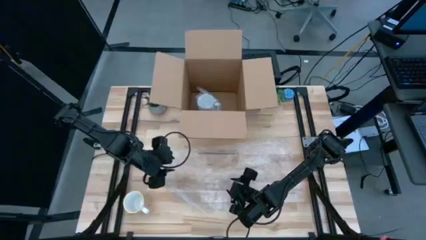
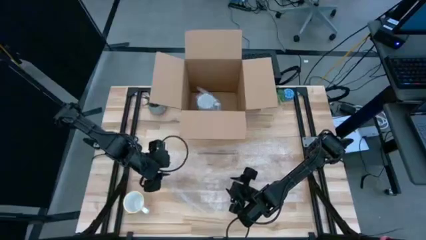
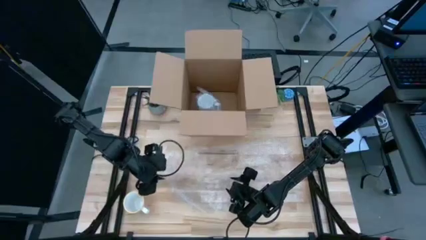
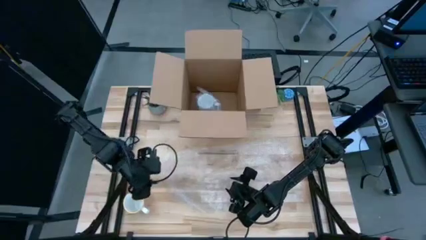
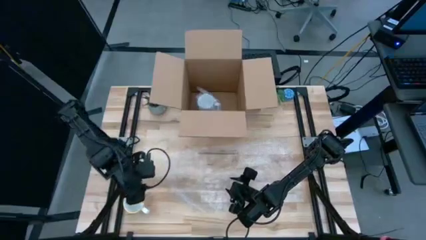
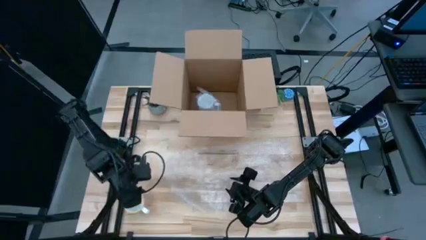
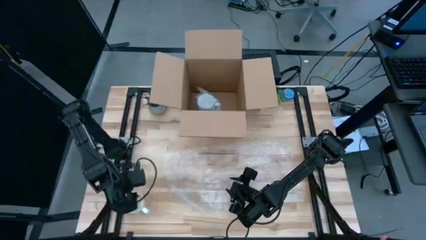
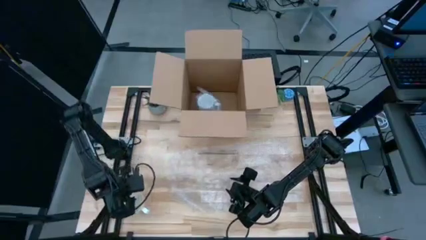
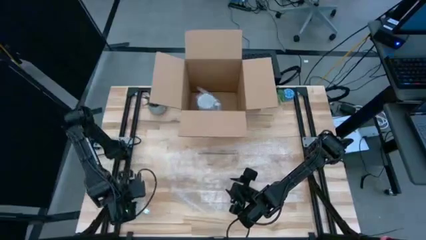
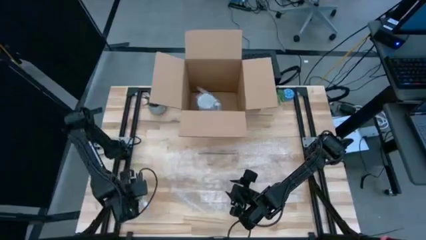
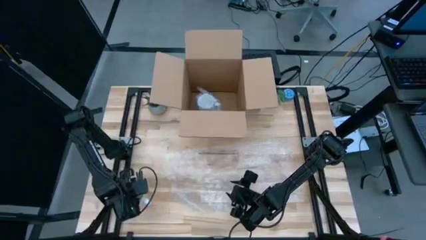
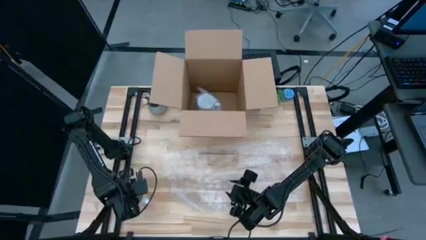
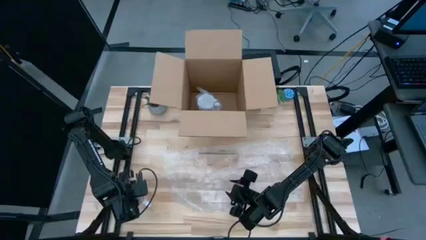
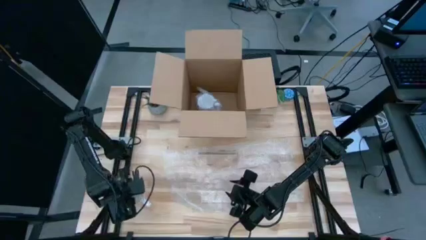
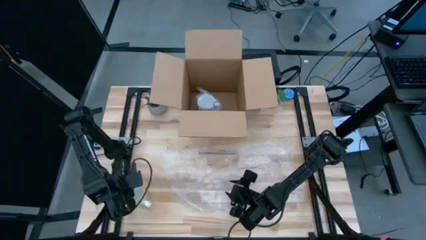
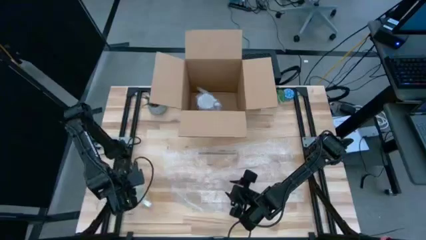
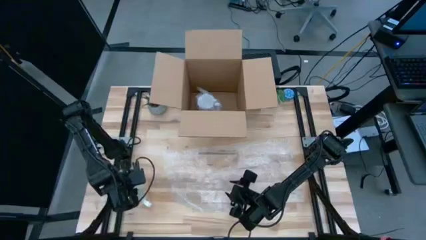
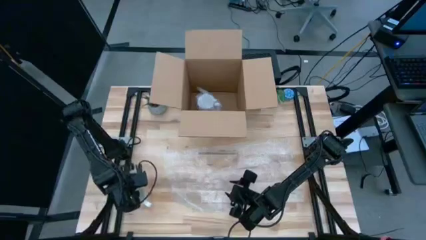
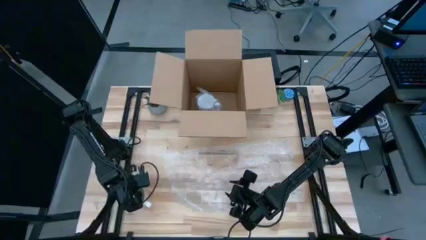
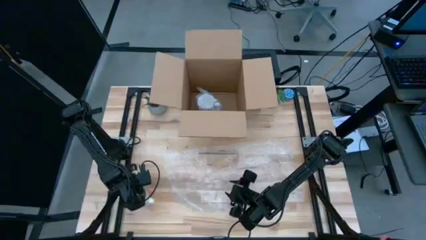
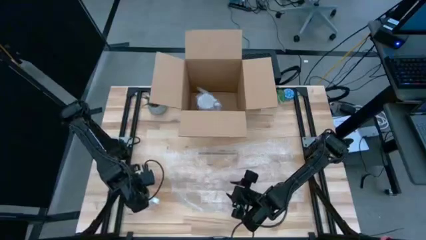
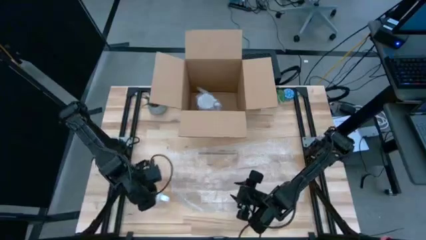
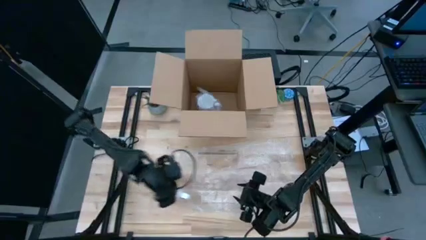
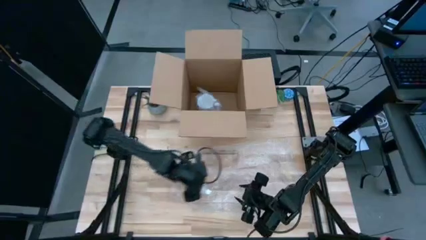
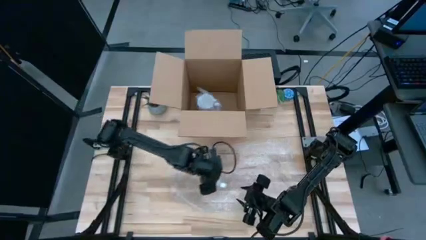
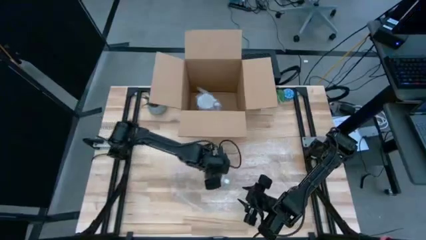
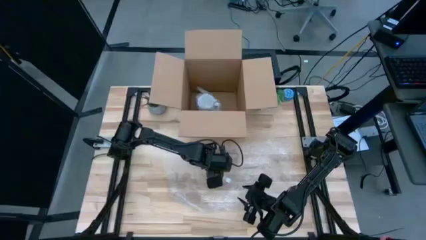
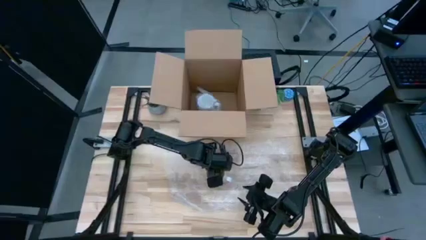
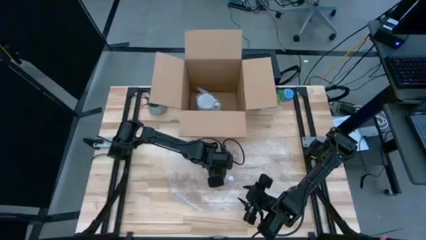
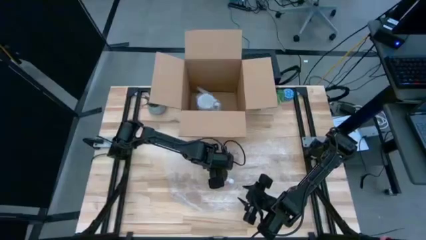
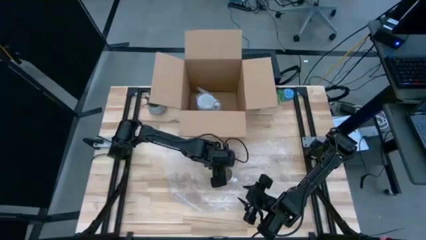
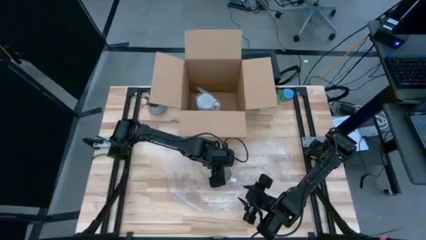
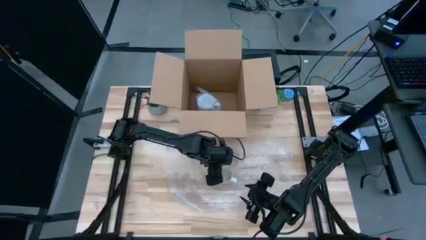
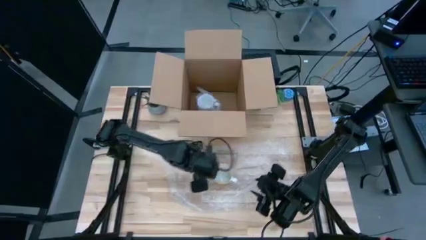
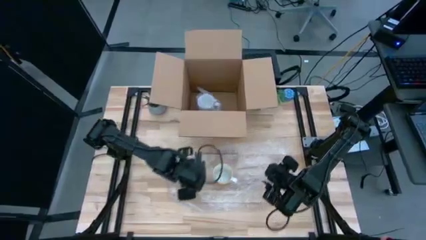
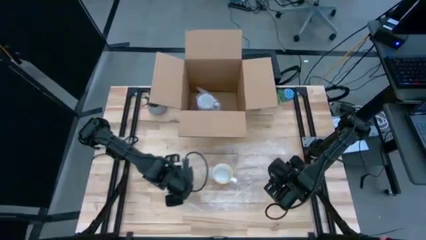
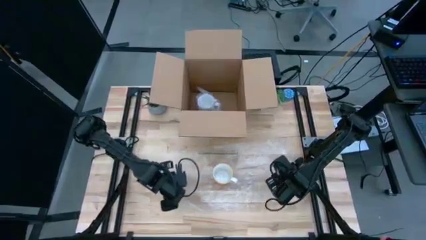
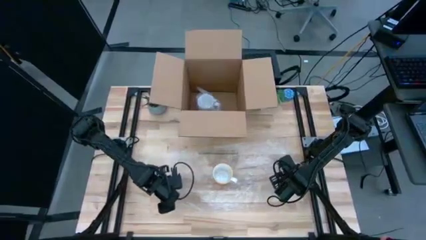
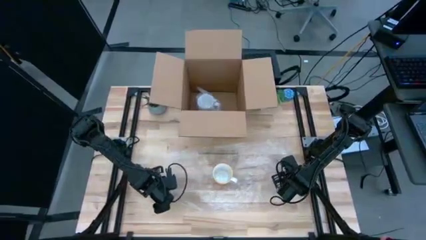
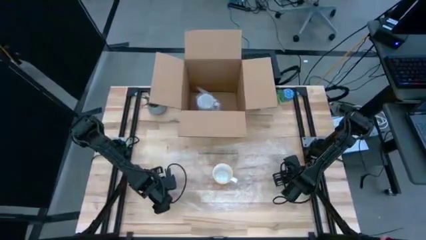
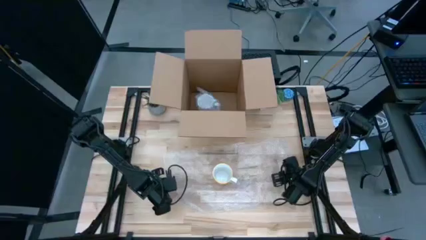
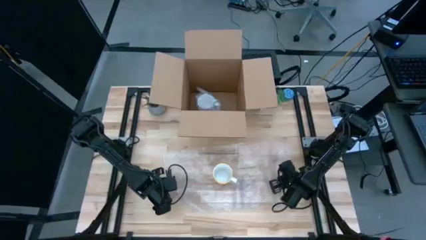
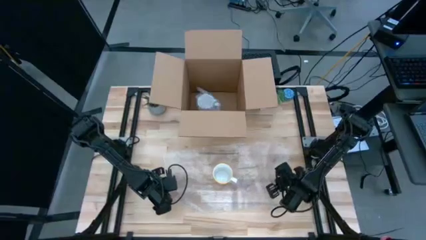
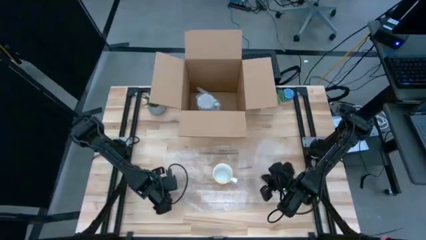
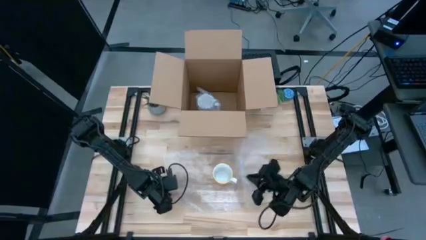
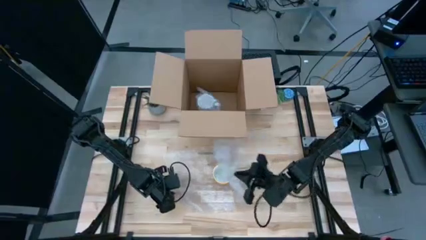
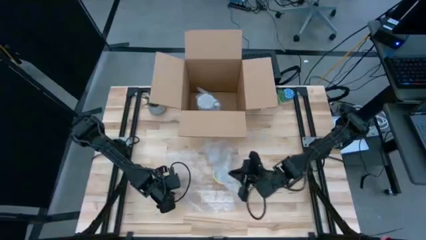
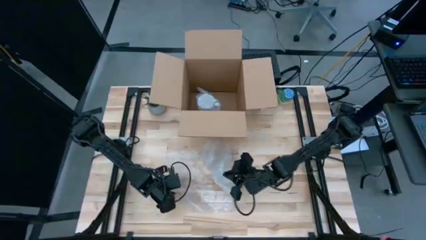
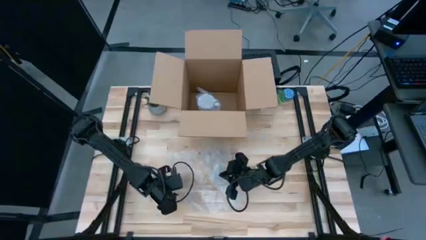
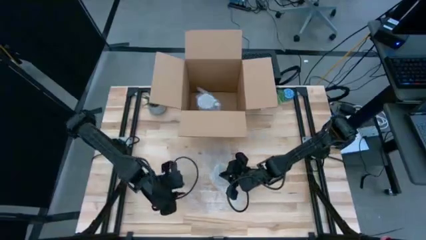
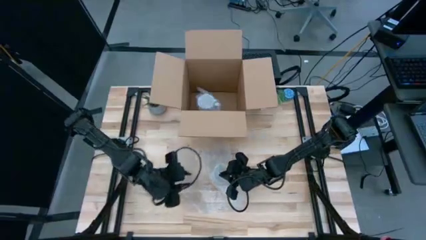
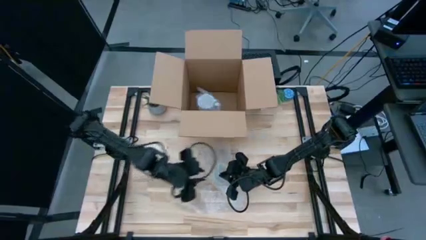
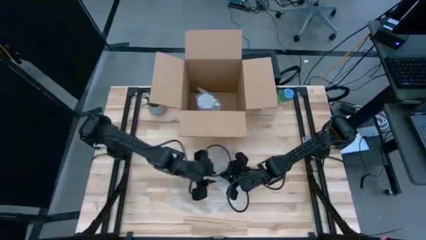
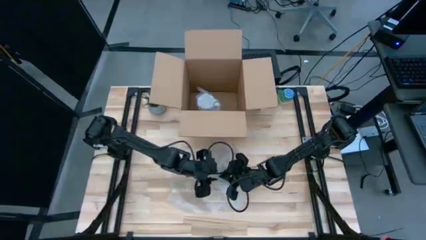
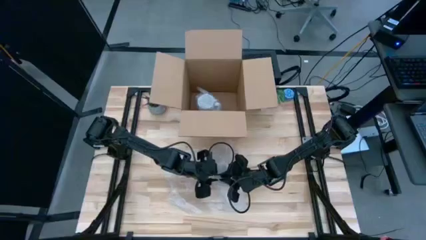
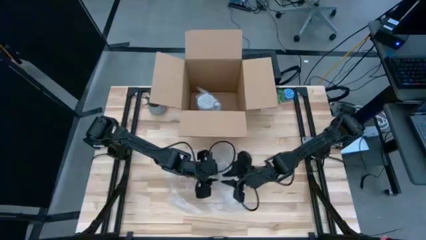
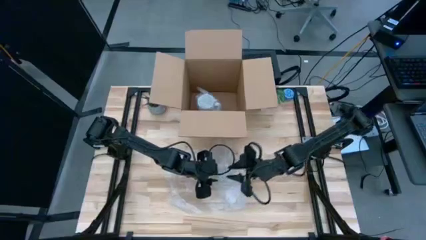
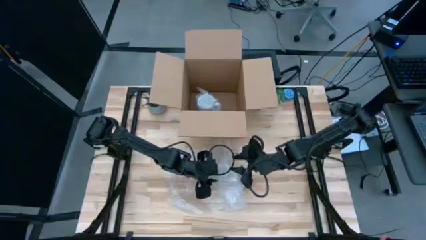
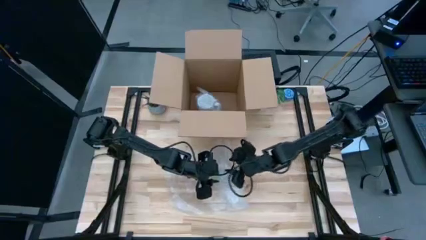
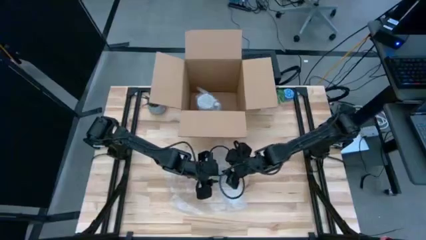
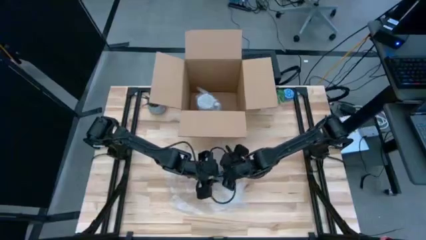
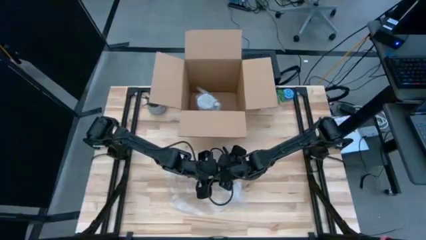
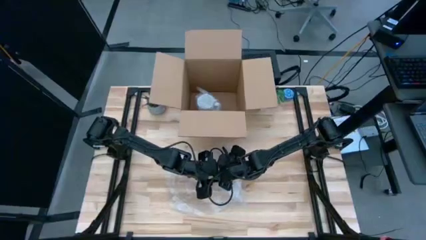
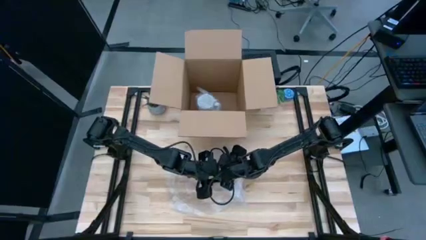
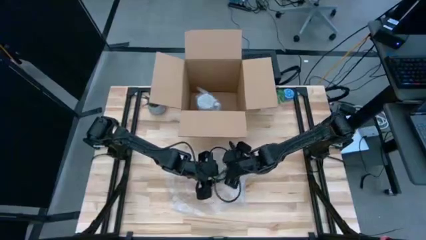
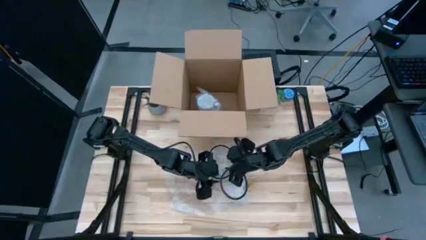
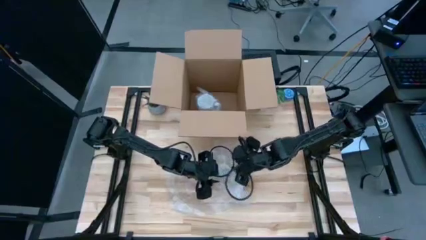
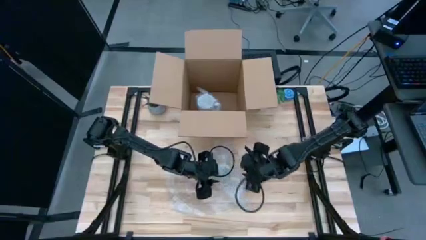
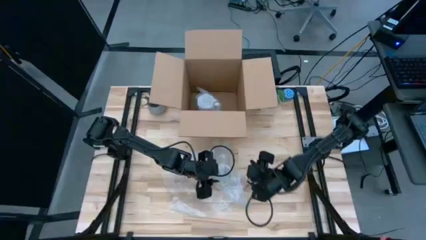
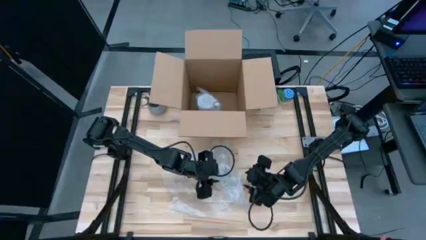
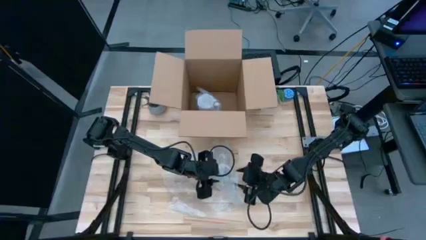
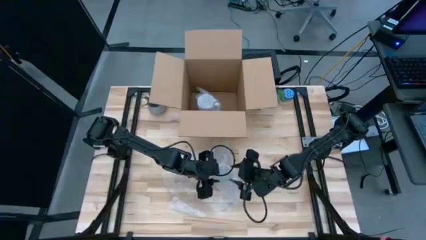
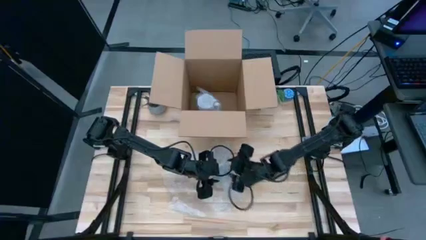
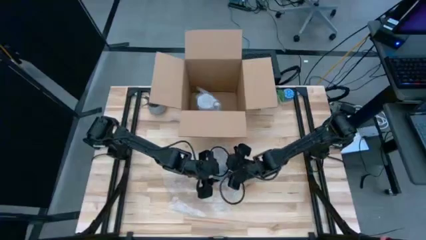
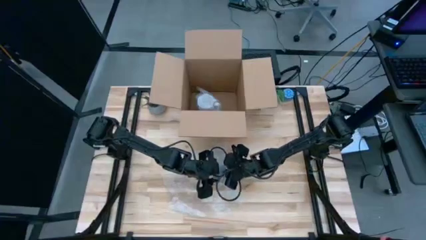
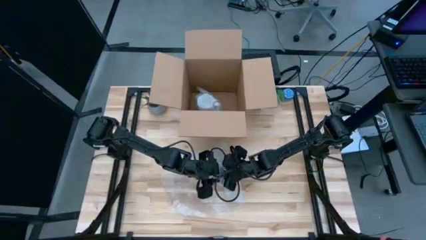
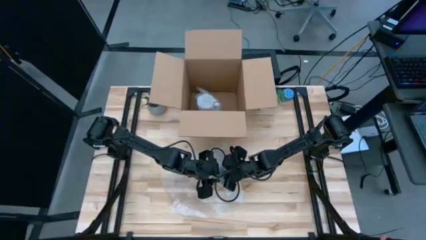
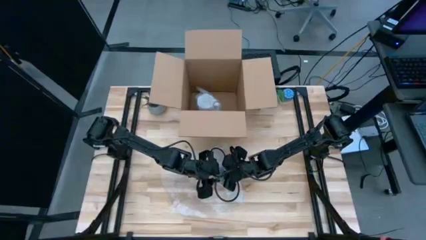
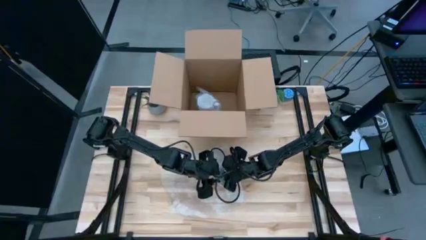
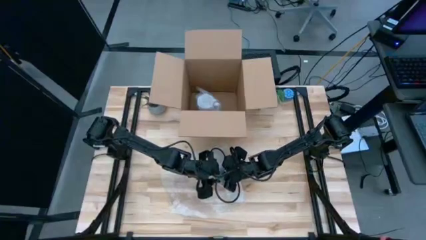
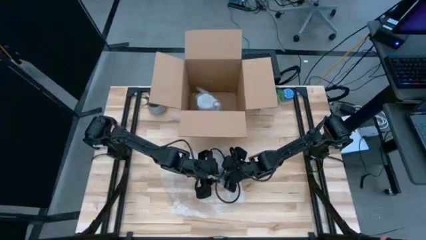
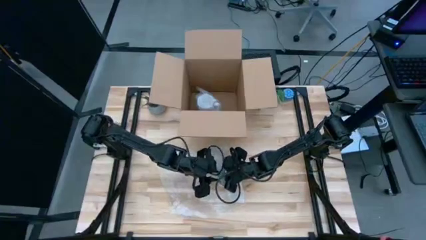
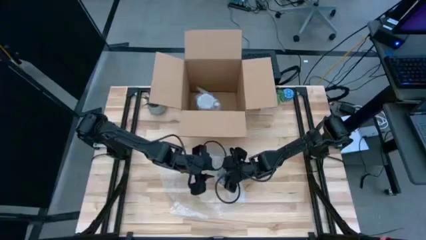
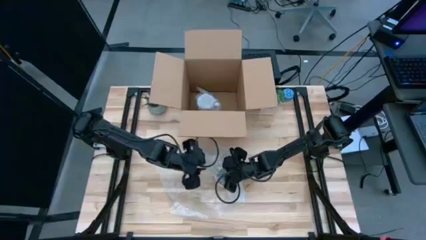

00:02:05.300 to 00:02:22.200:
Task: wrap mug
Wrap the orange mug with bubble wrap
